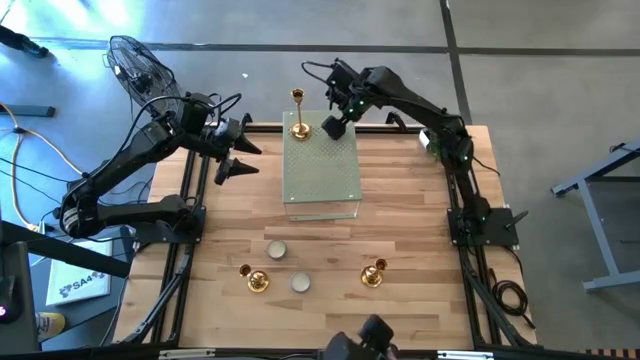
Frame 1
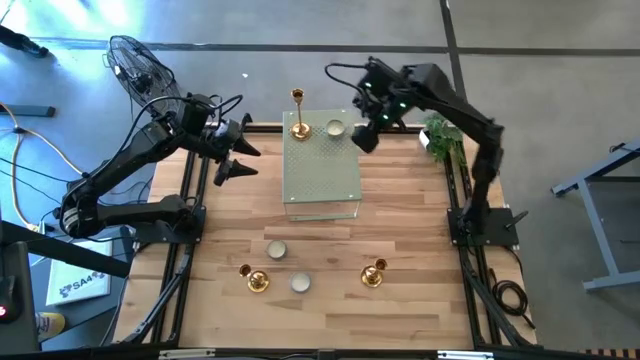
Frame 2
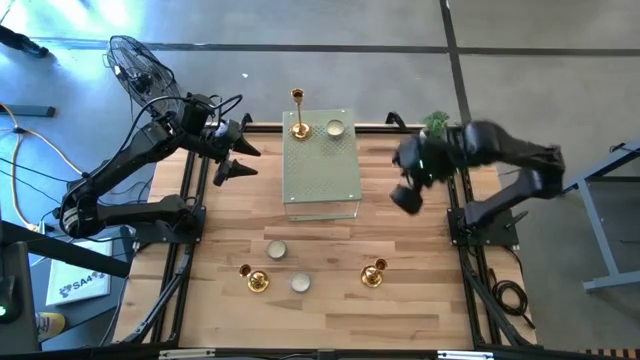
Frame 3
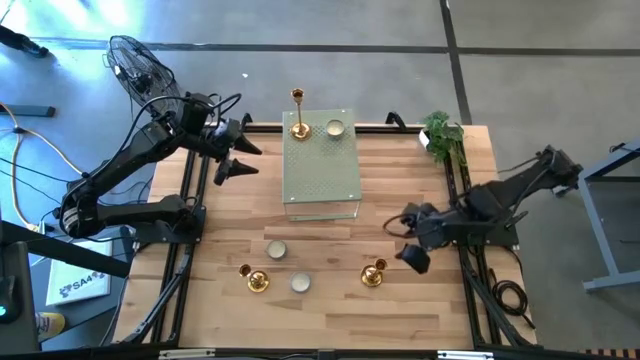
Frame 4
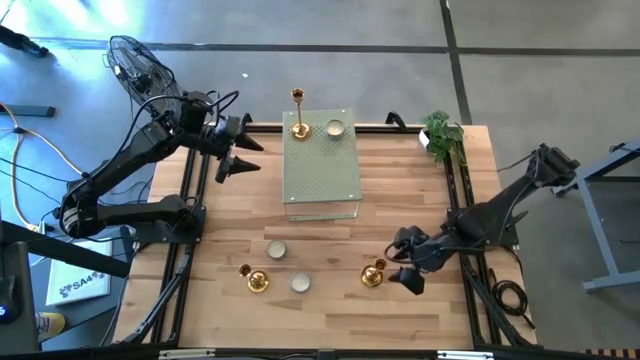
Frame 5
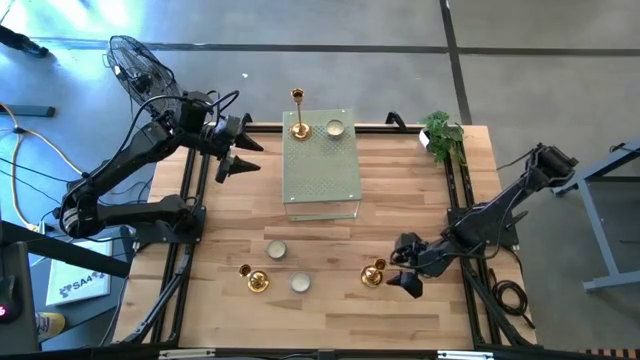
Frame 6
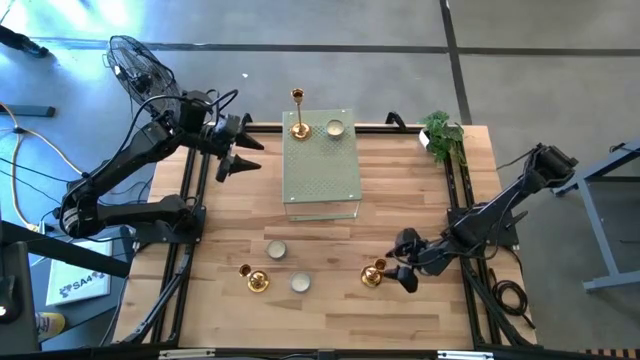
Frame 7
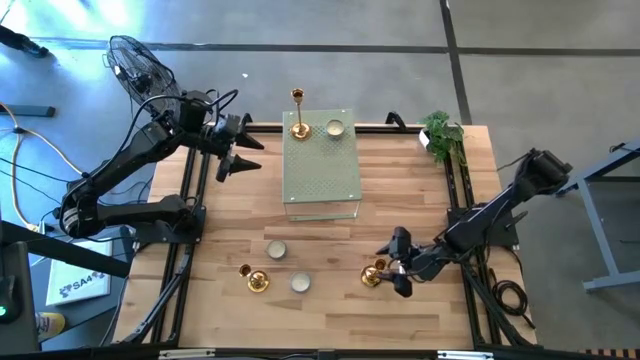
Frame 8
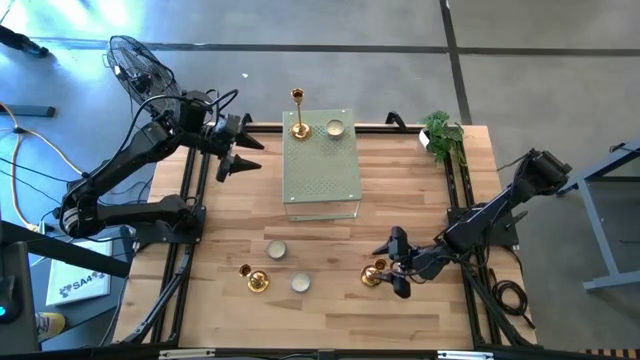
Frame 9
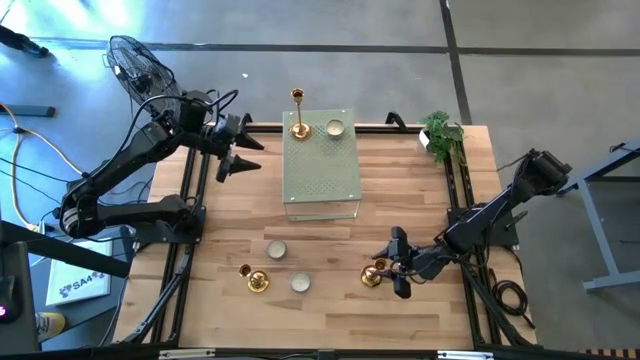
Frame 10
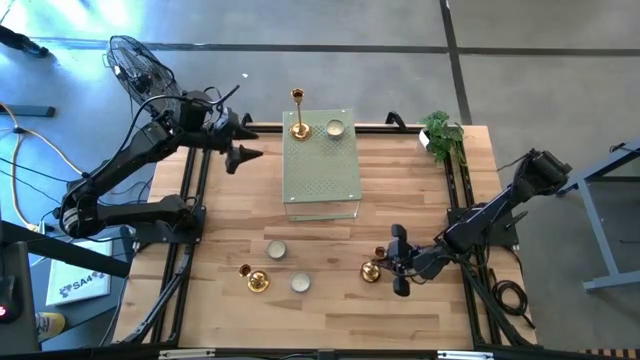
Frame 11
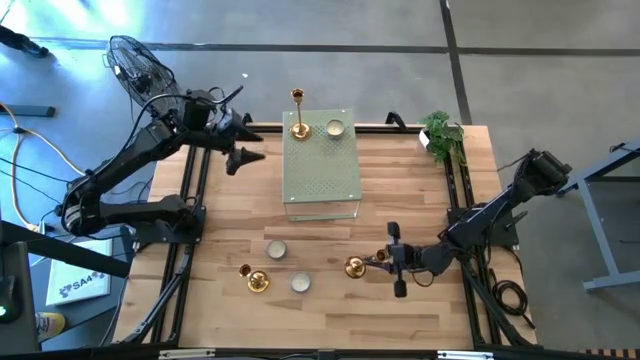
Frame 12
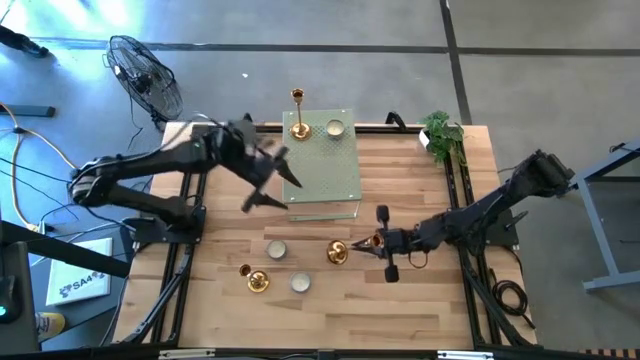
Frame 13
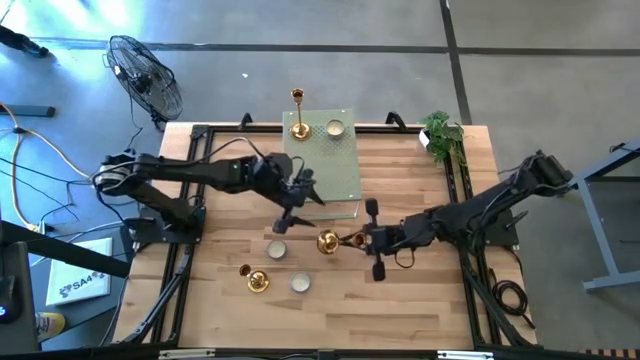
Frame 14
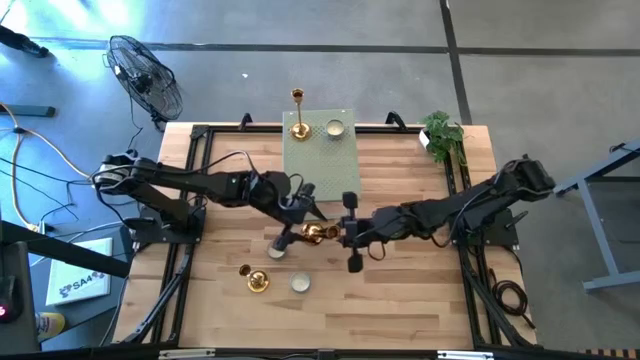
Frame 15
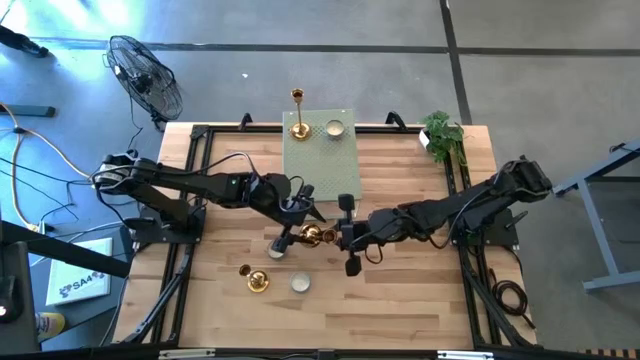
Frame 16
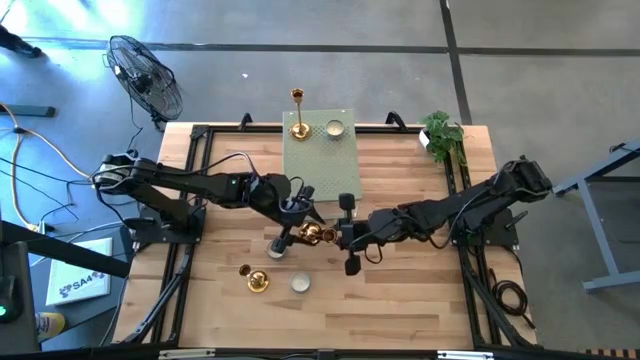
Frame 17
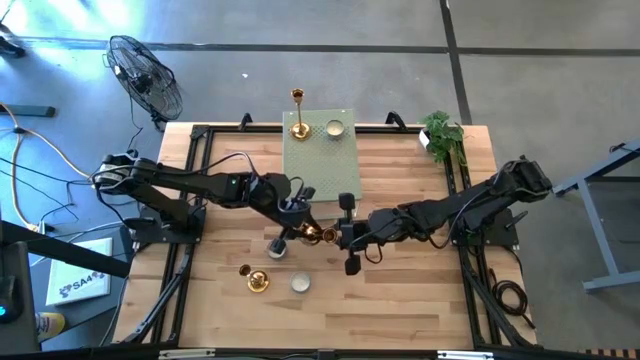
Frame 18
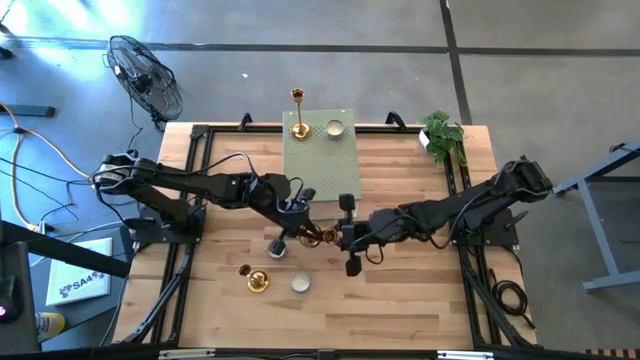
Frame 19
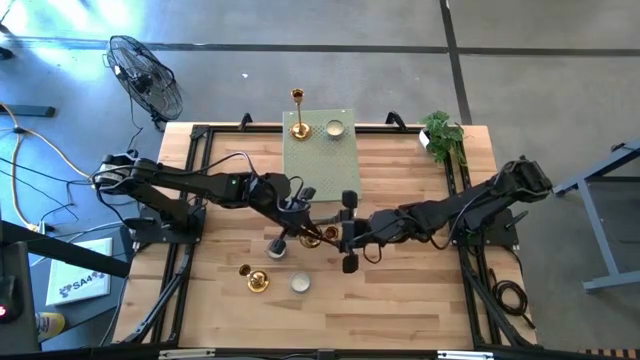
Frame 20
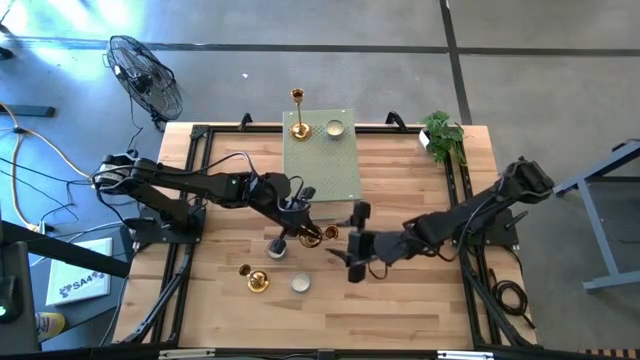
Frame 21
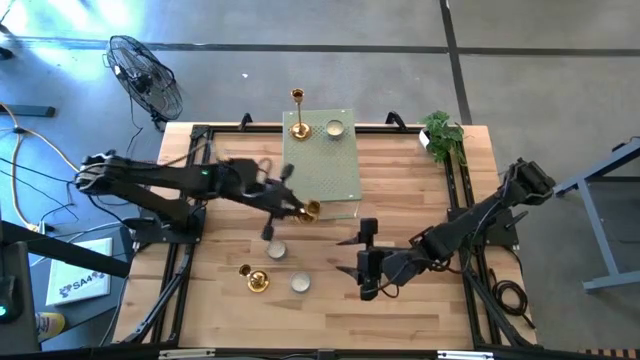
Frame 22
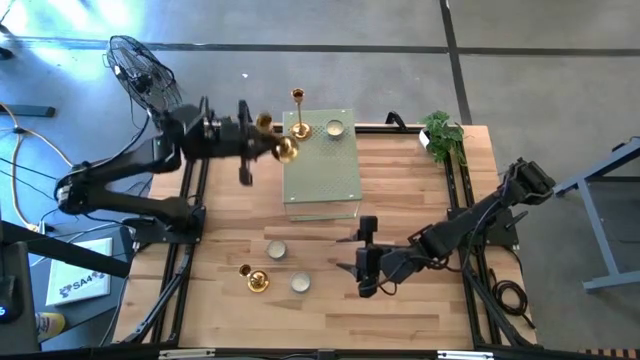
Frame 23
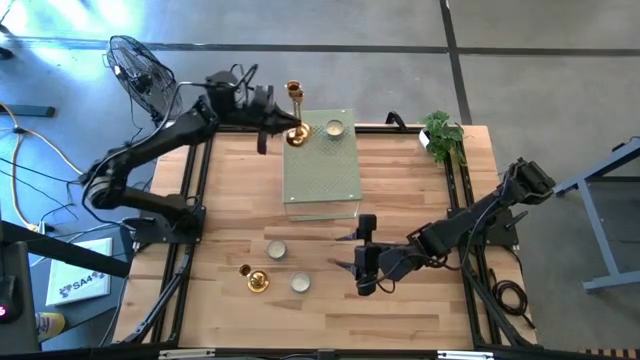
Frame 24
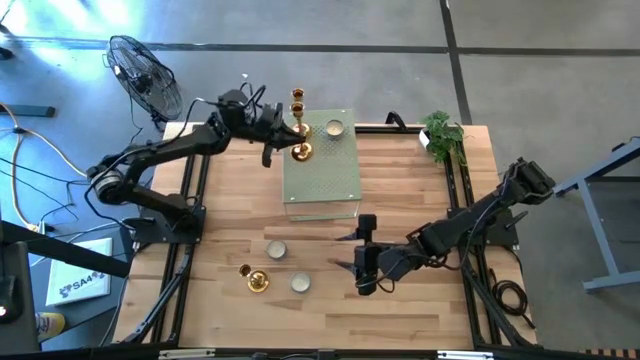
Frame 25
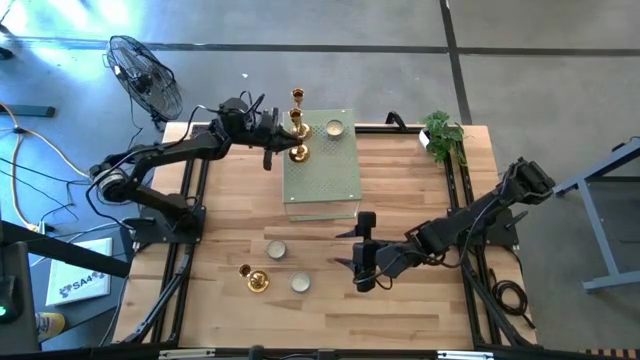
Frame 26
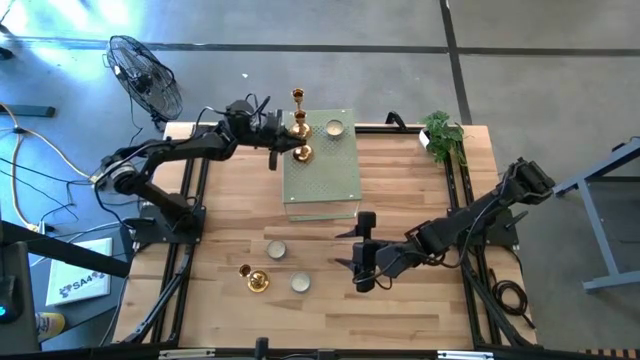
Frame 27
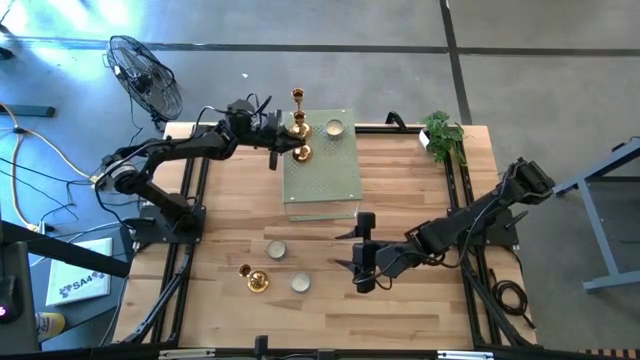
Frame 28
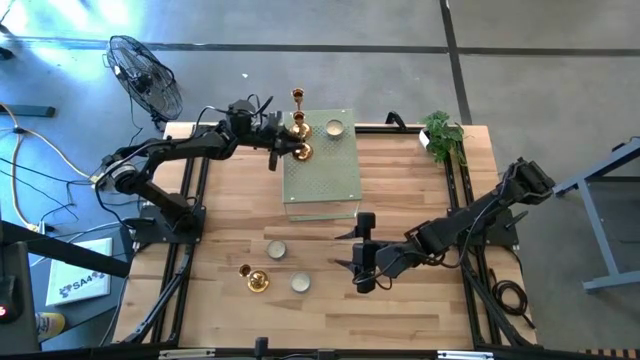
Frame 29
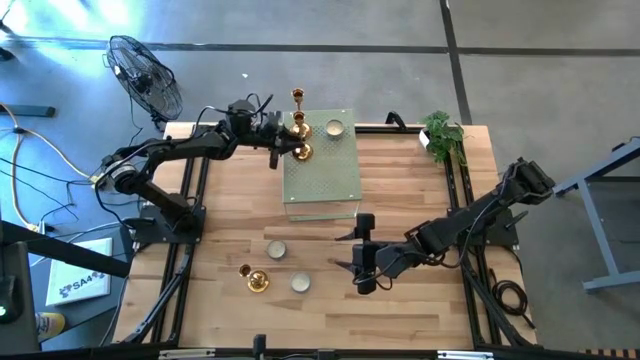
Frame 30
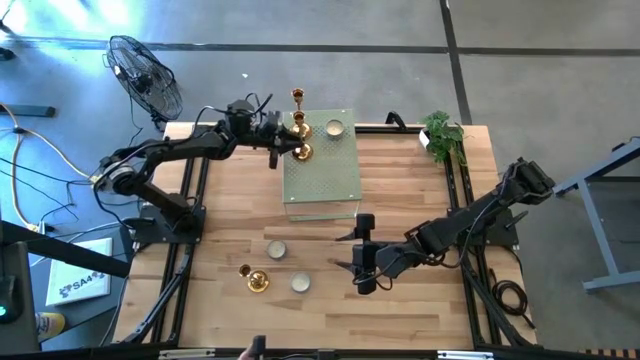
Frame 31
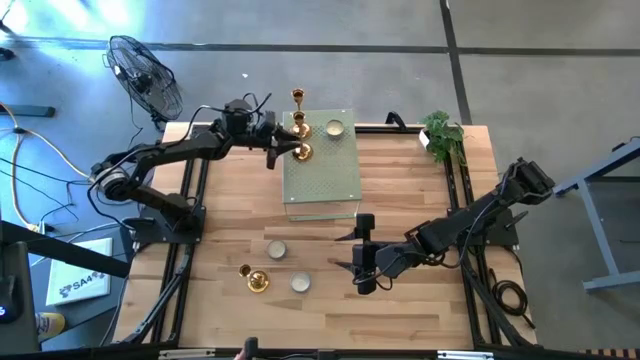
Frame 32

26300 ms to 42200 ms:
Task: Pick & Place candle stick holders
Put the right gold candle holder on the shelf aligned with the other gold candle holder

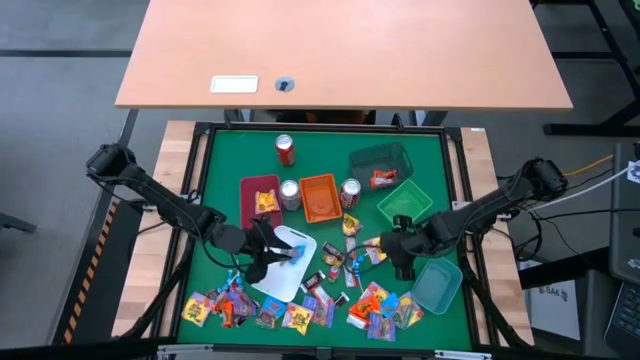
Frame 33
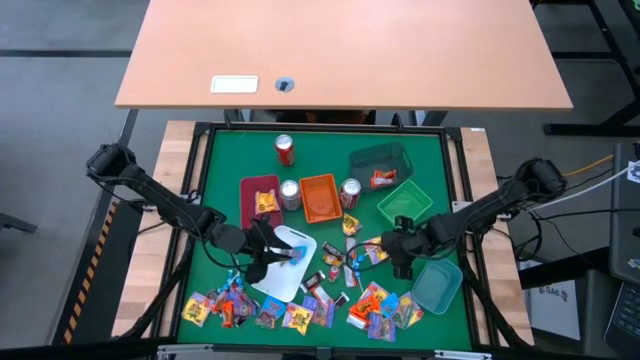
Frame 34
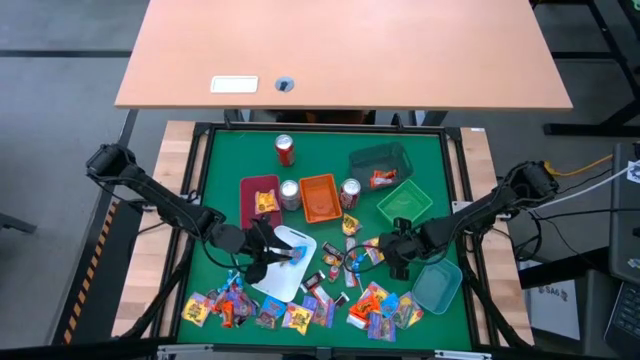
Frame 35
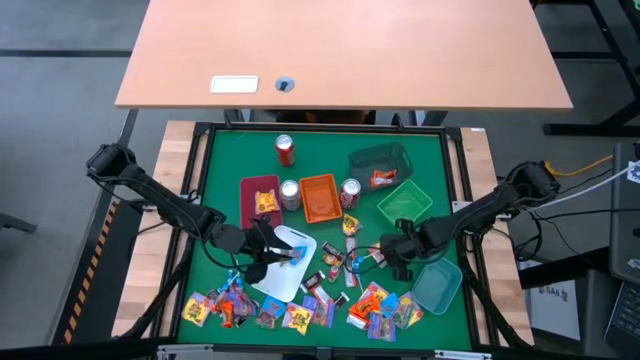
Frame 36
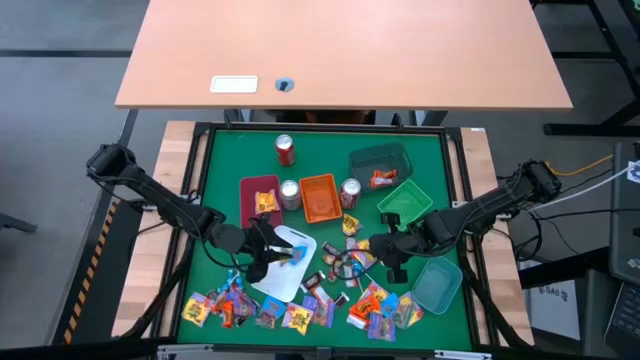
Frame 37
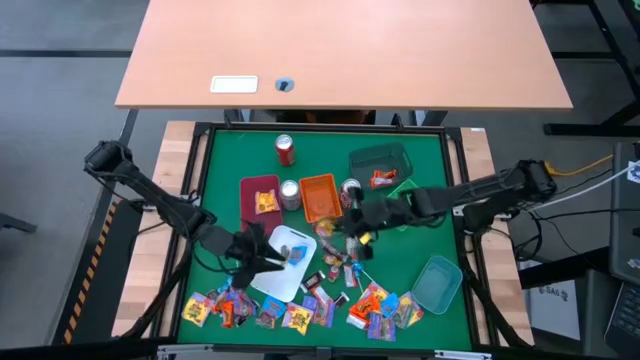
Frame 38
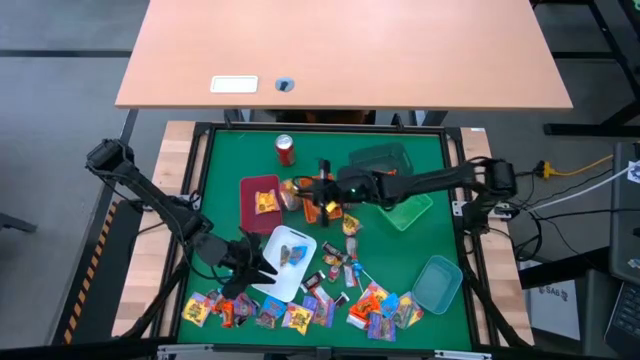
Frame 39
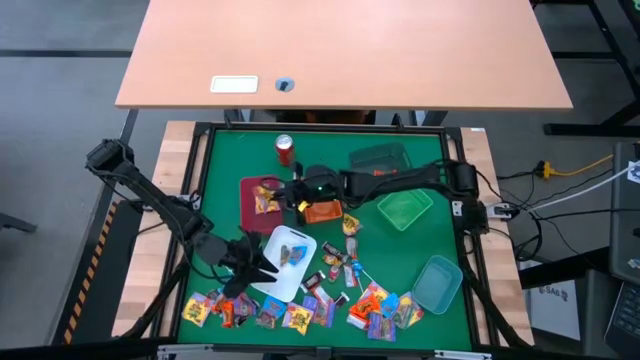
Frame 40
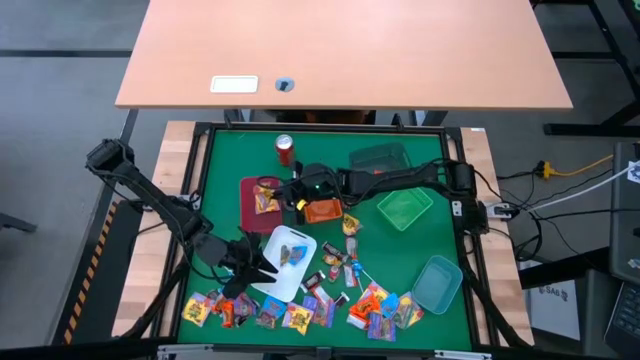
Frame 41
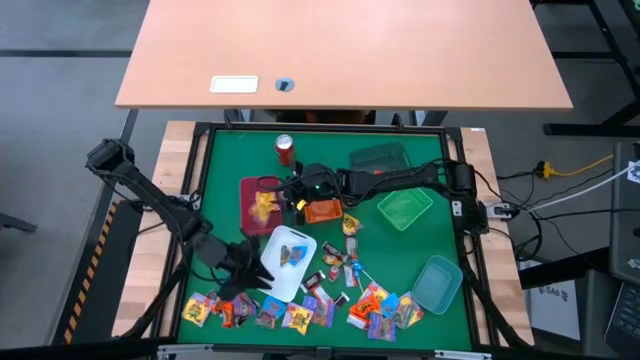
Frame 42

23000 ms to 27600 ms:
Task: Sort candy
Put the yellow candy into the red bin
